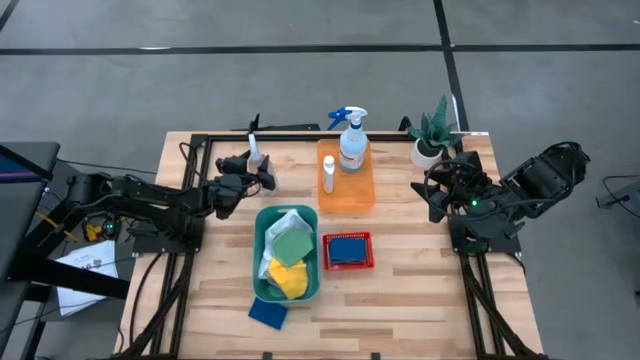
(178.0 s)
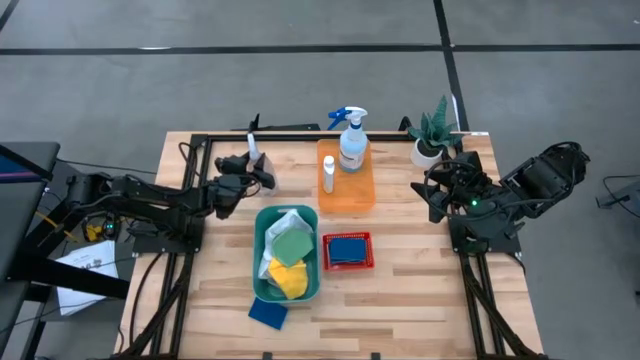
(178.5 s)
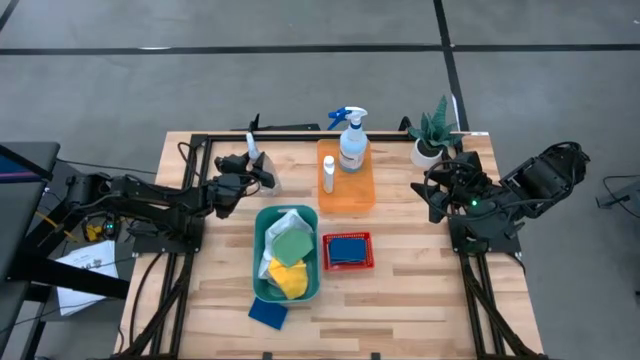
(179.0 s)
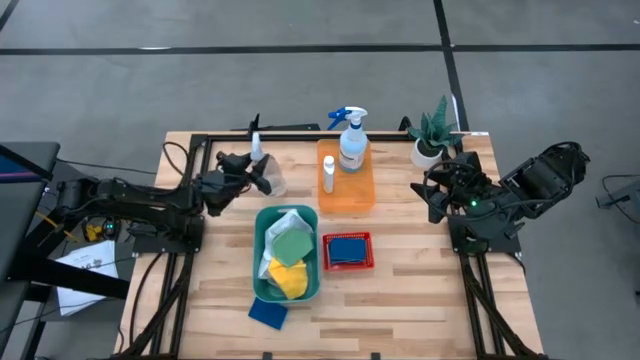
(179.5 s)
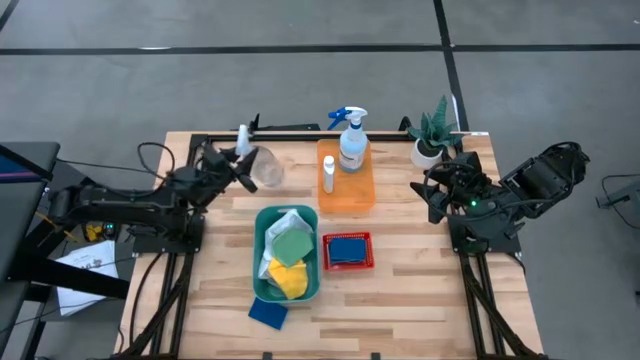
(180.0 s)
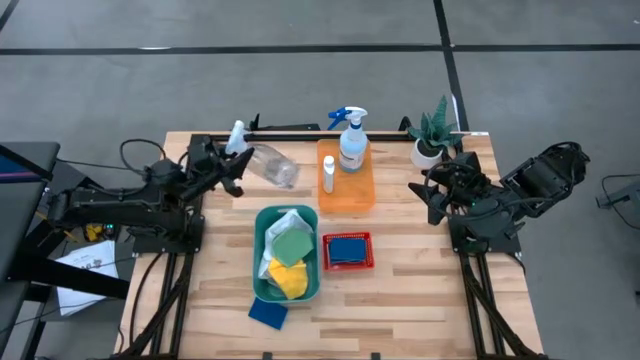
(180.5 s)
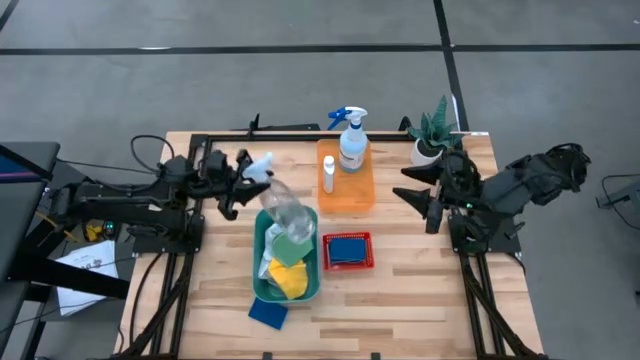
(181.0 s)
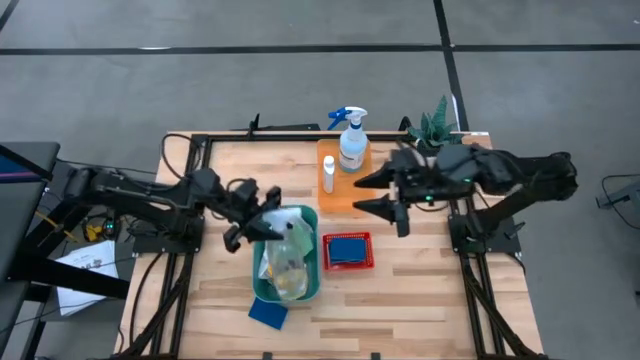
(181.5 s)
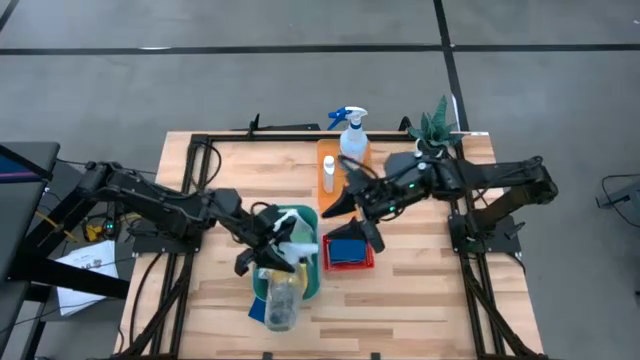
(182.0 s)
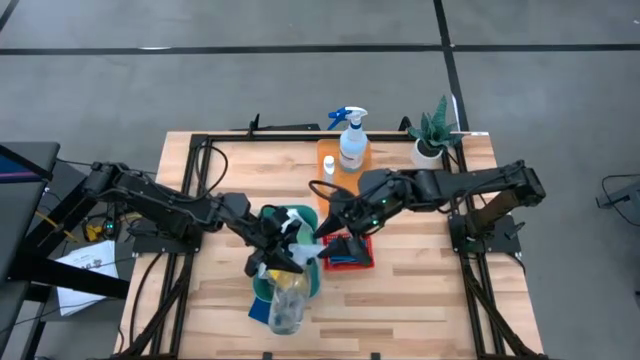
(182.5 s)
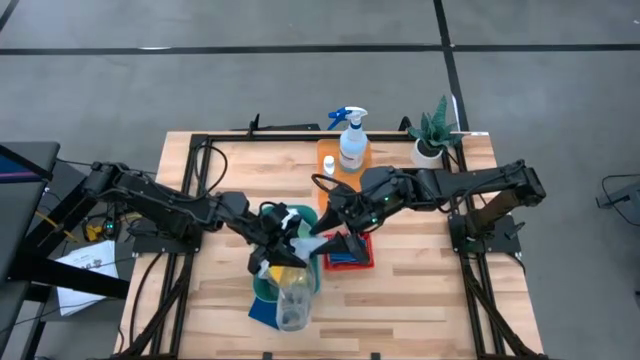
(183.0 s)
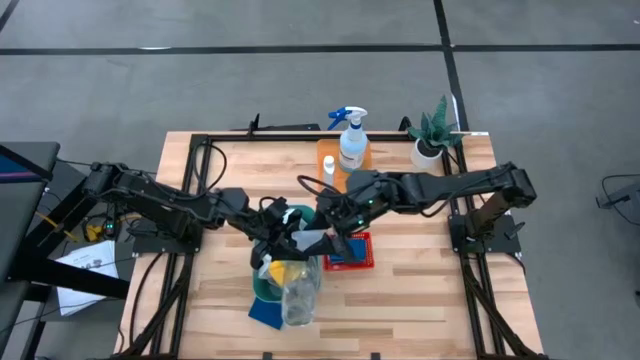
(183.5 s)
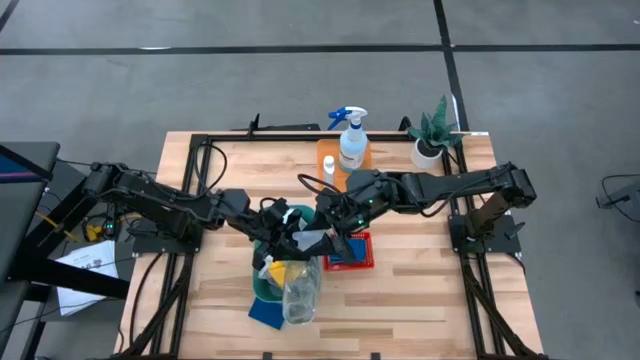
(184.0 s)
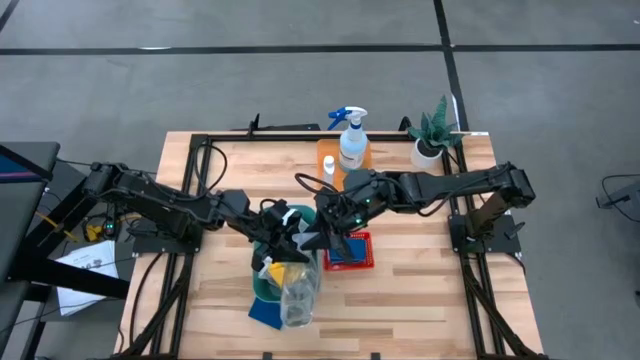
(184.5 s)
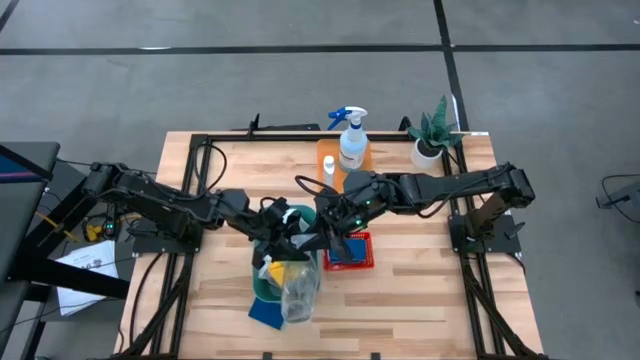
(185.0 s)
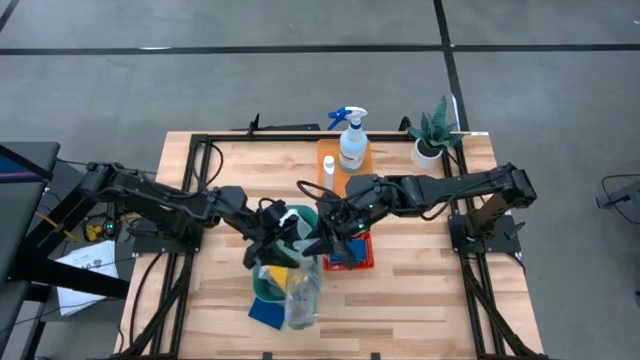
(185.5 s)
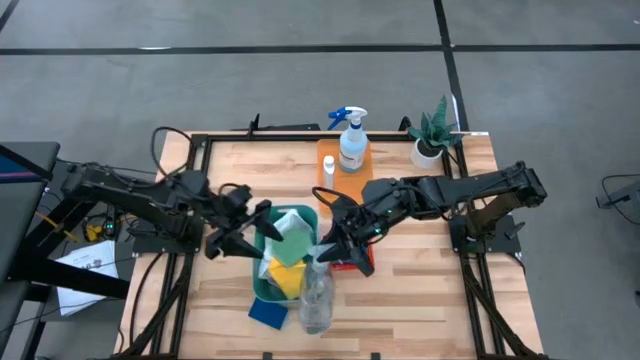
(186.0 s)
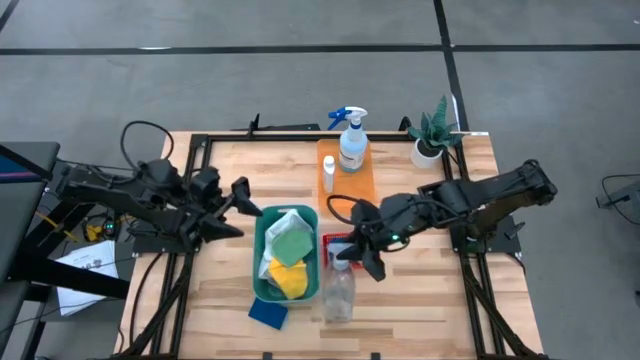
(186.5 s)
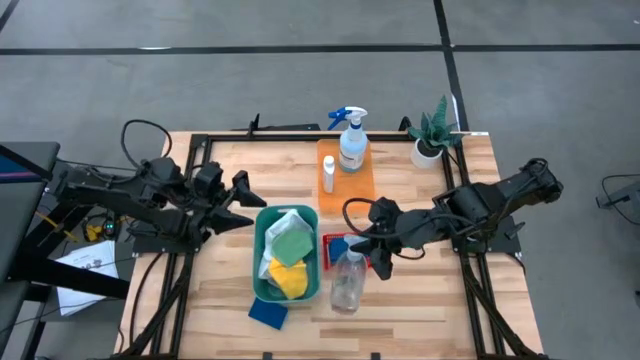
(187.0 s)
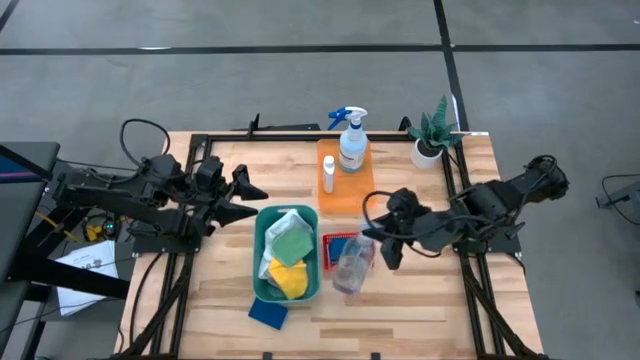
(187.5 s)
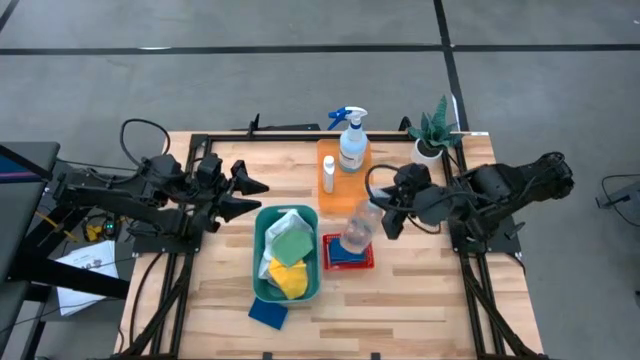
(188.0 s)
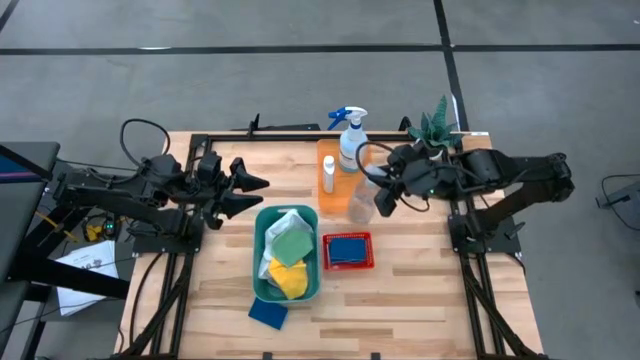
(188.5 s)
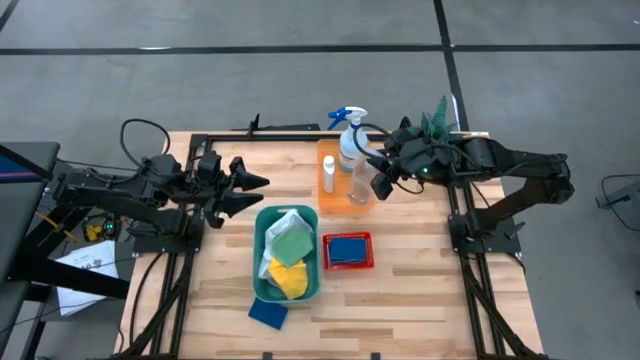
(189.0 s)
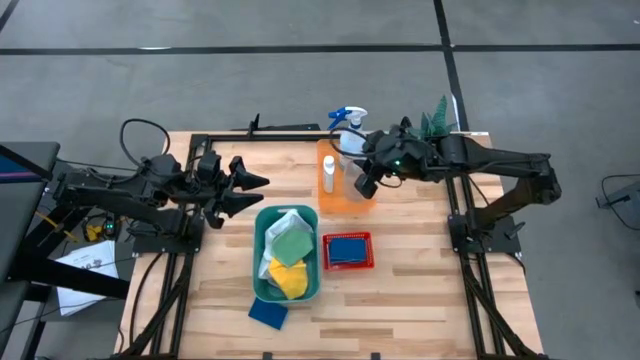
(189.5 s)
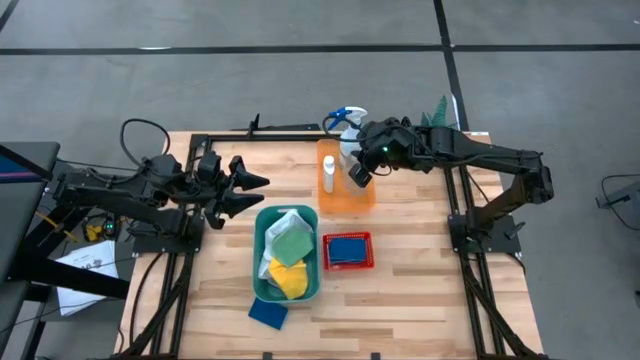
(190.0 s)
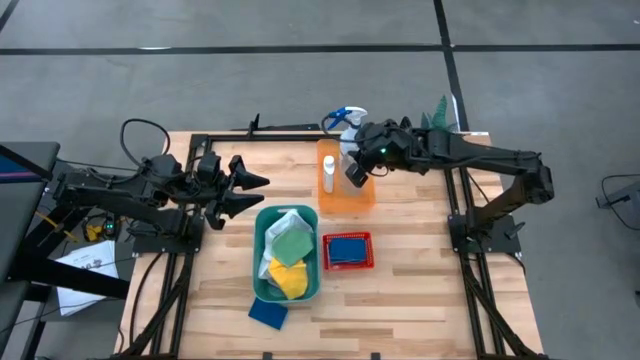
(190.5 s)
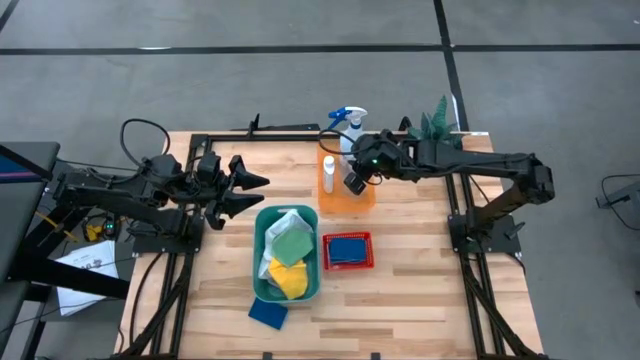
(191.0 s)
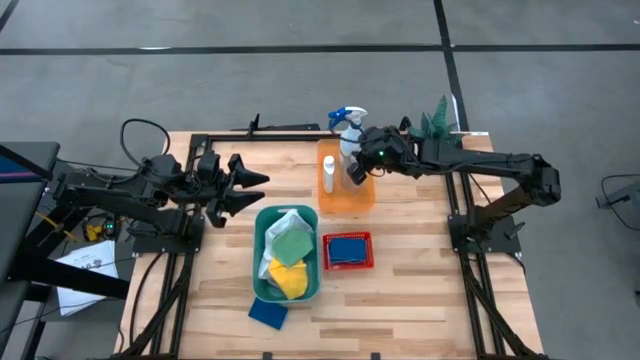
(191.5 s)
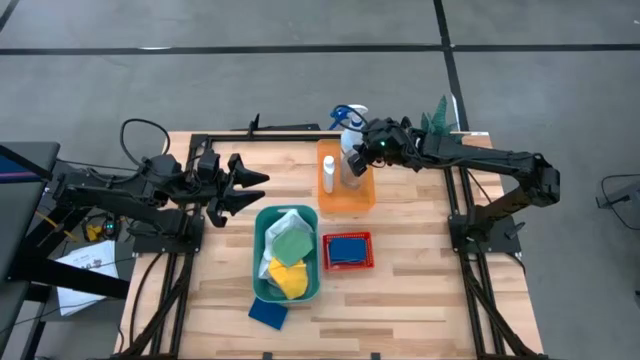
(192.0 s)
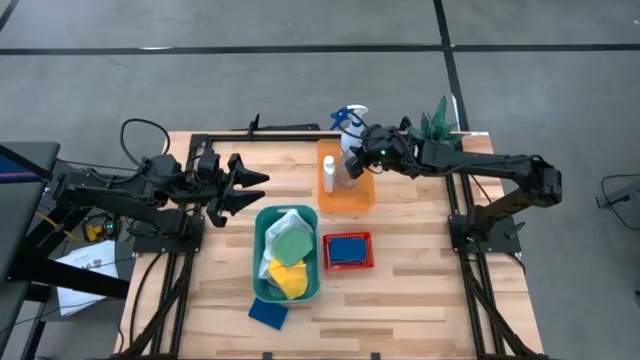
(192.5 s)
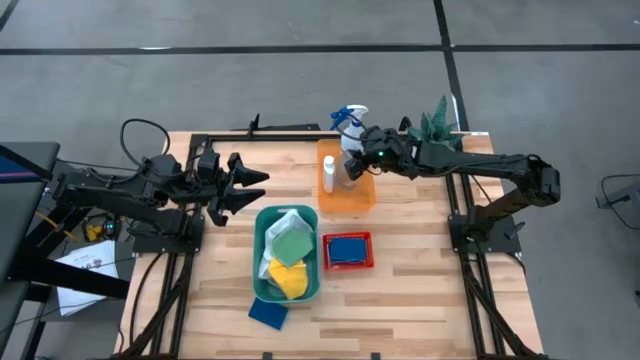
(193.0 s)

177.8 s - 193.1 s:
Task: Pick & Place Kitchen Items
Put the transparent spray bottle into the orange bin

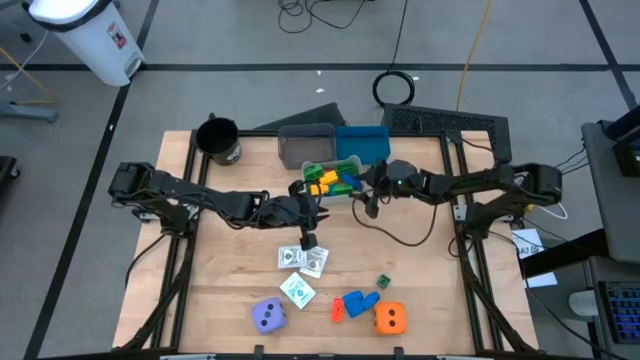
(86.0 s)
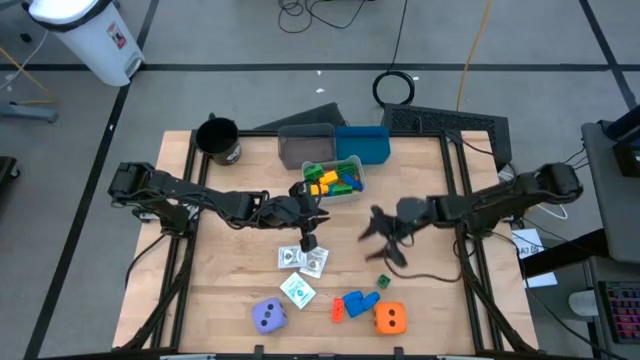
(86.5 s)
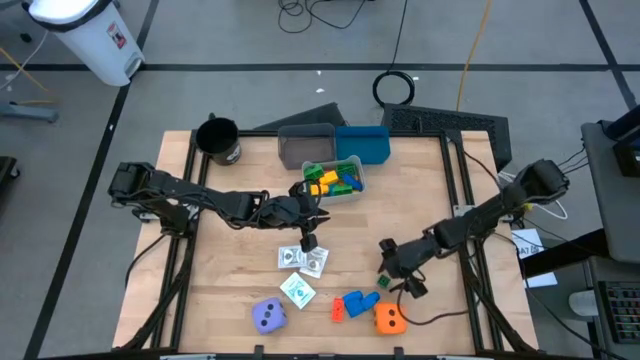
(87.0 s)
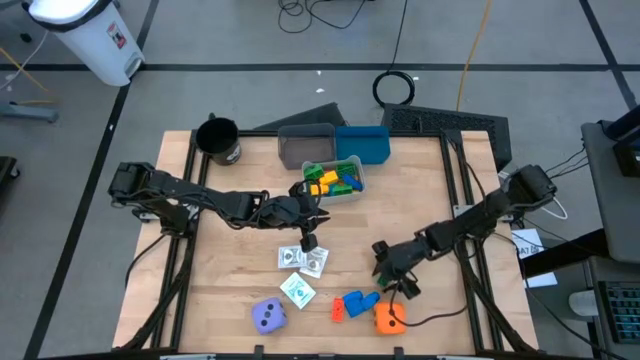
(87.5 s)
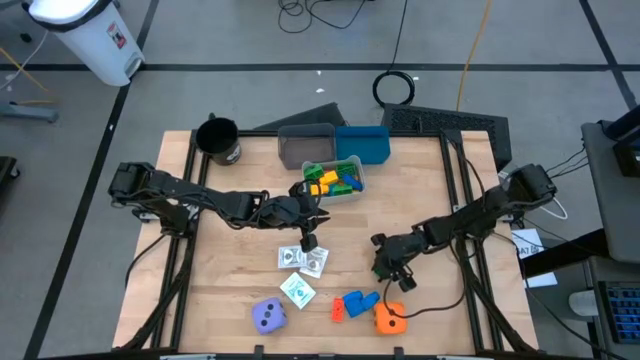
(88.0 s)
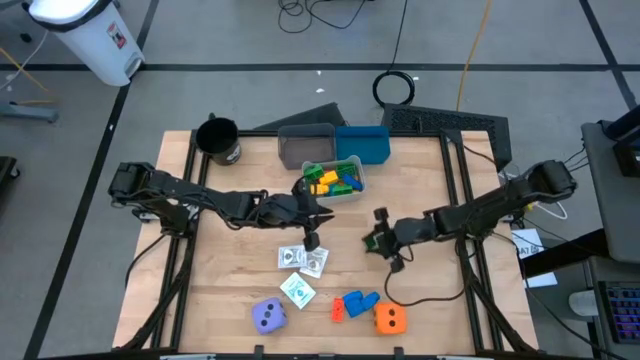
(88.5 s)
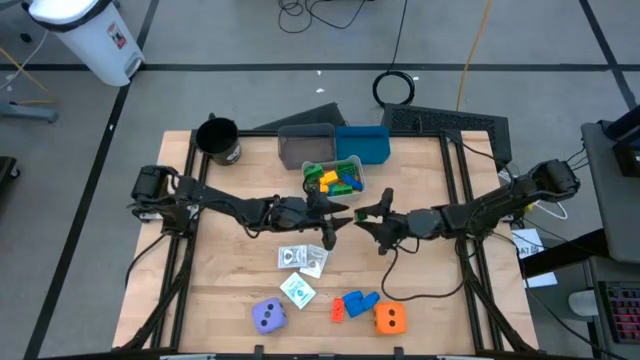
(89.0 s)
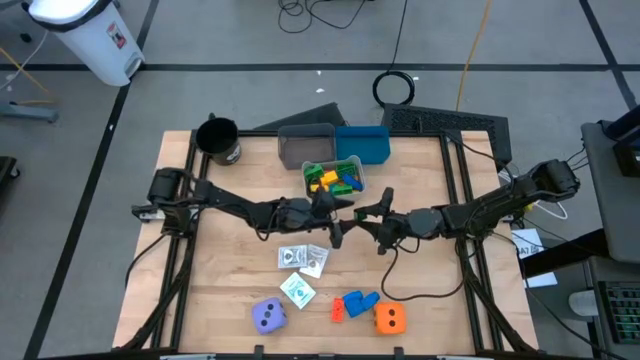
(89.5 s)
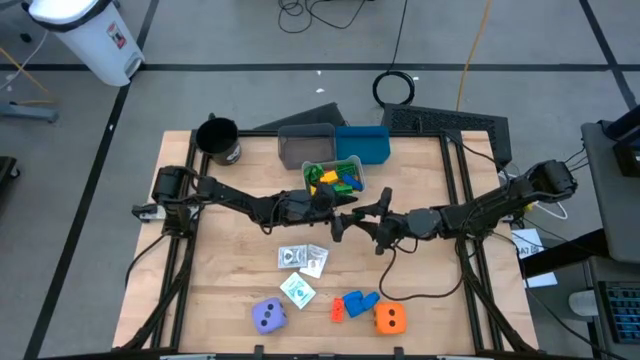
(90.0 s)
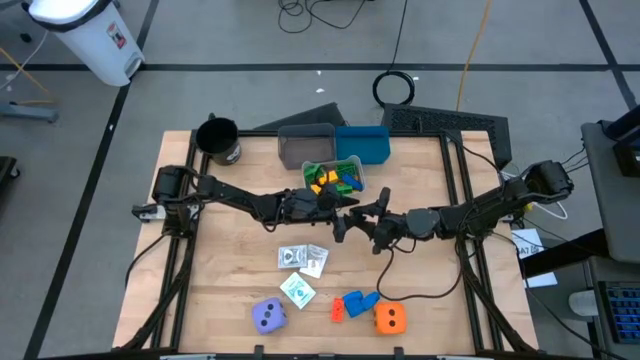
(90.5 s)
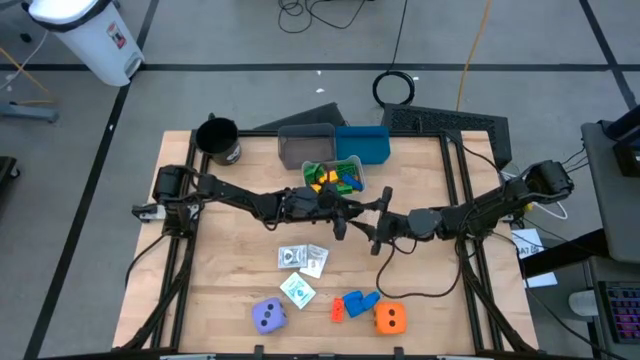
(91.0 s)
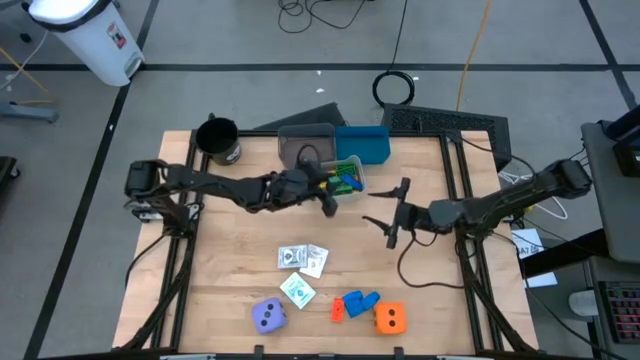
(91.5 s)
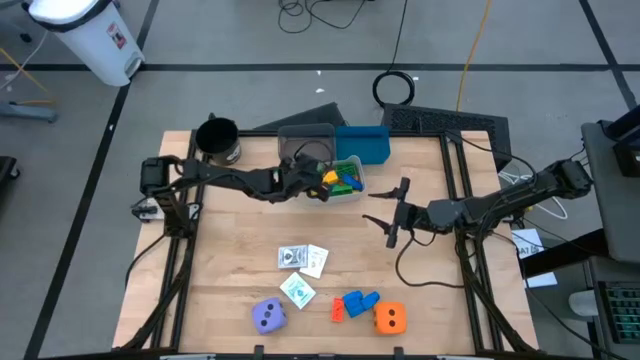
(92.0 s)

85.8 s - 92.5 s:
Task: Pick & Place Toys
Put the dark green game piece into the gray bin
